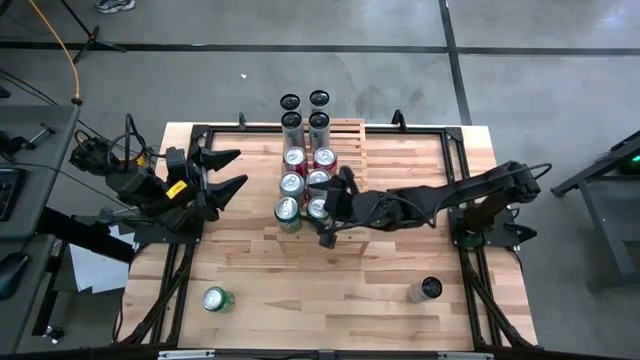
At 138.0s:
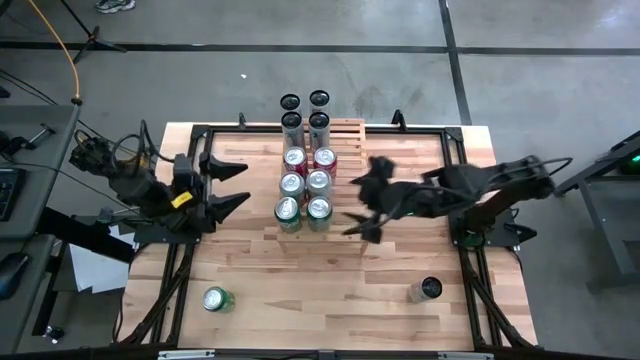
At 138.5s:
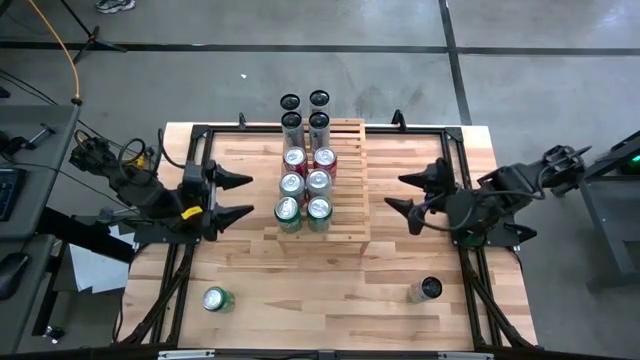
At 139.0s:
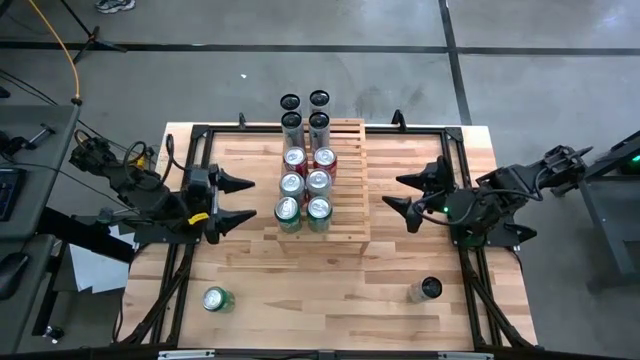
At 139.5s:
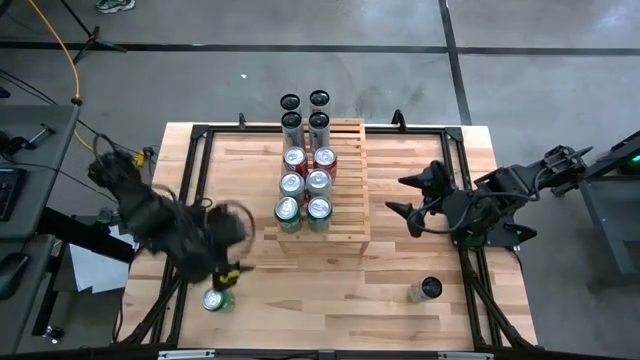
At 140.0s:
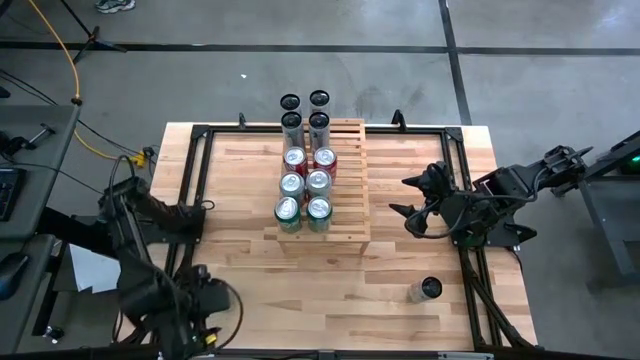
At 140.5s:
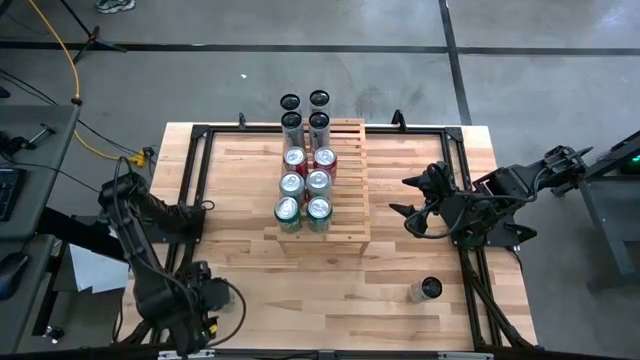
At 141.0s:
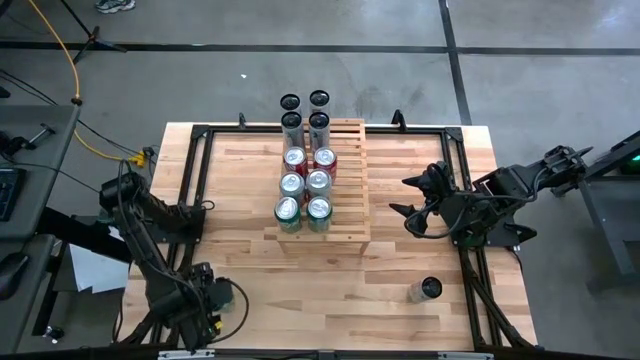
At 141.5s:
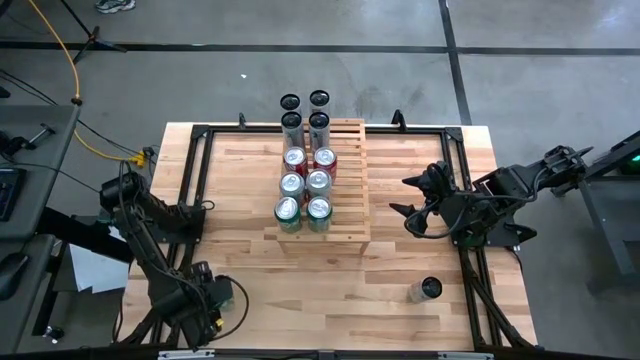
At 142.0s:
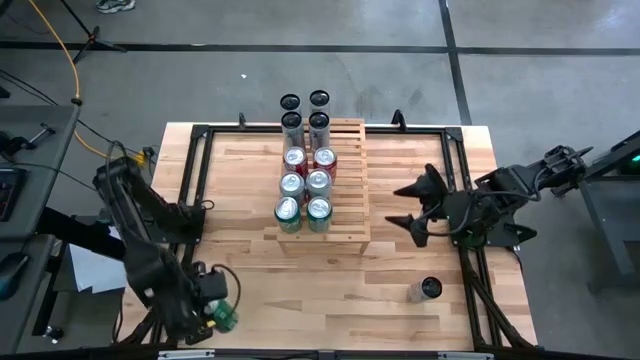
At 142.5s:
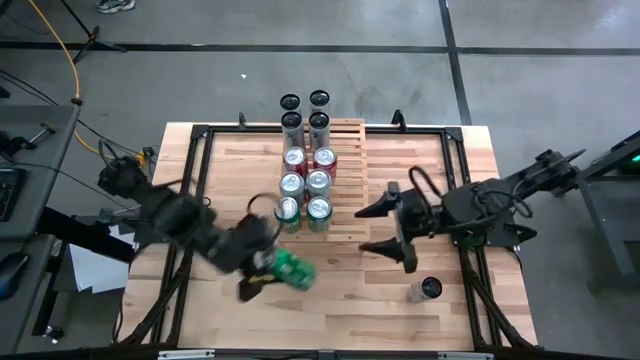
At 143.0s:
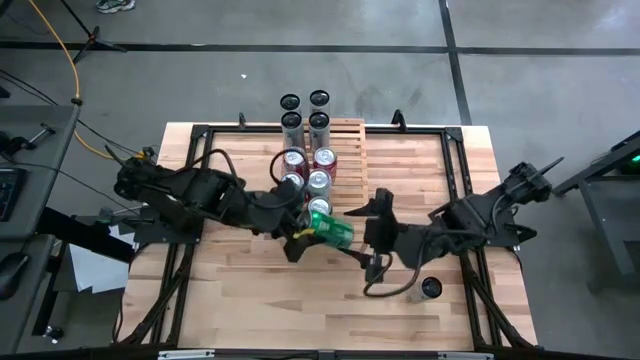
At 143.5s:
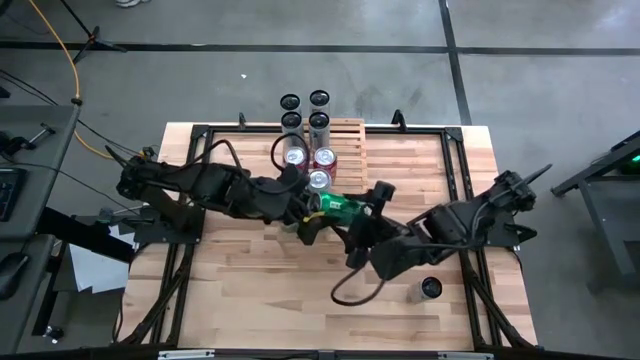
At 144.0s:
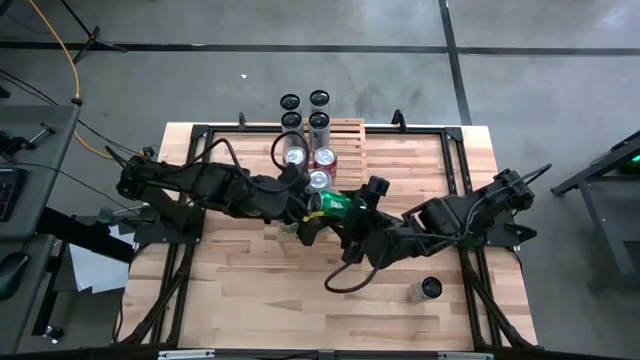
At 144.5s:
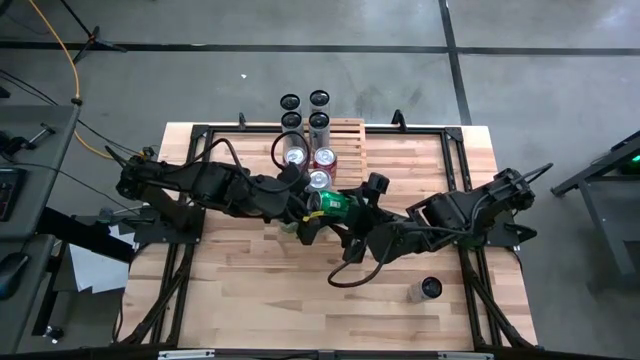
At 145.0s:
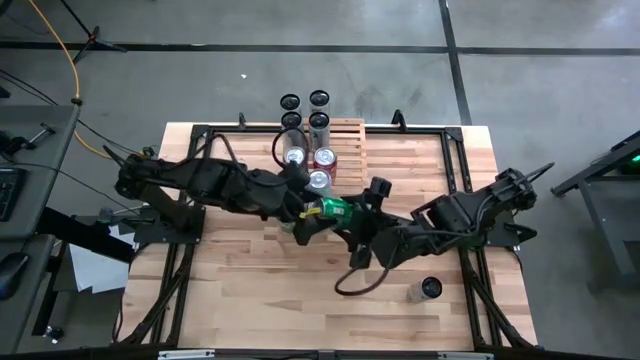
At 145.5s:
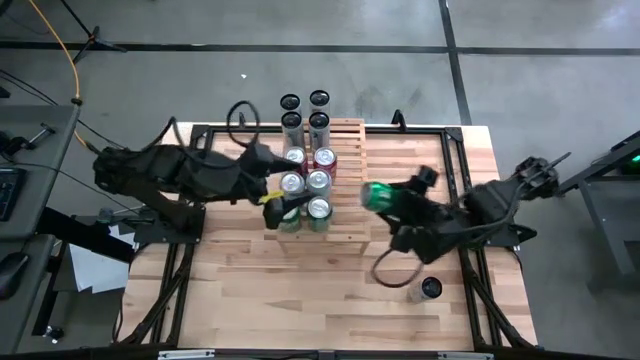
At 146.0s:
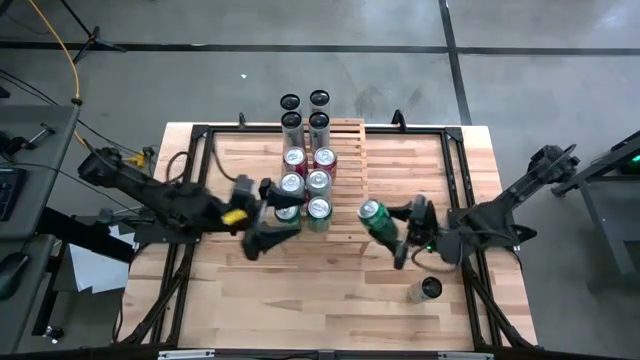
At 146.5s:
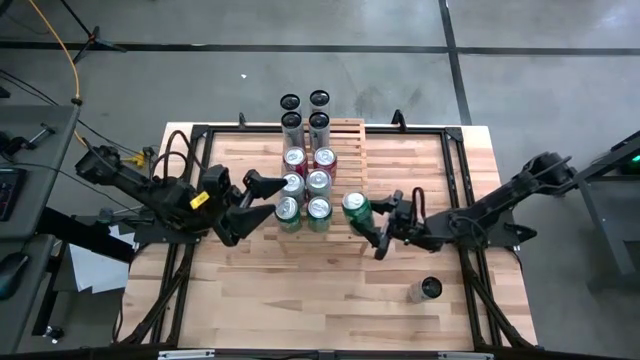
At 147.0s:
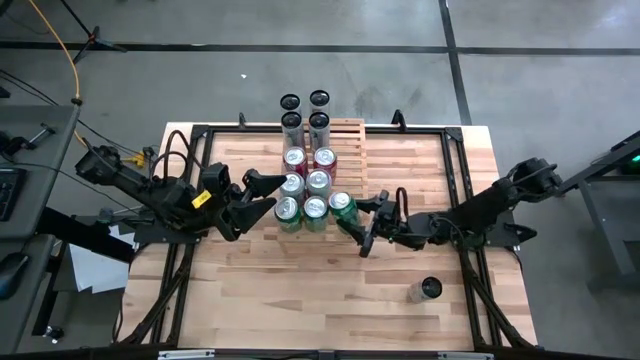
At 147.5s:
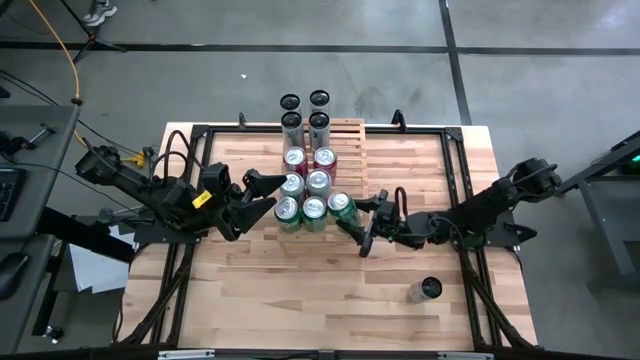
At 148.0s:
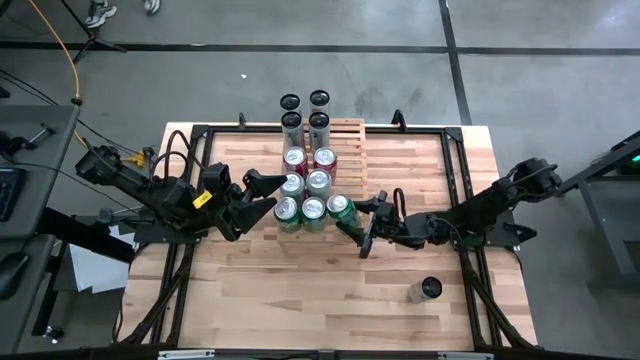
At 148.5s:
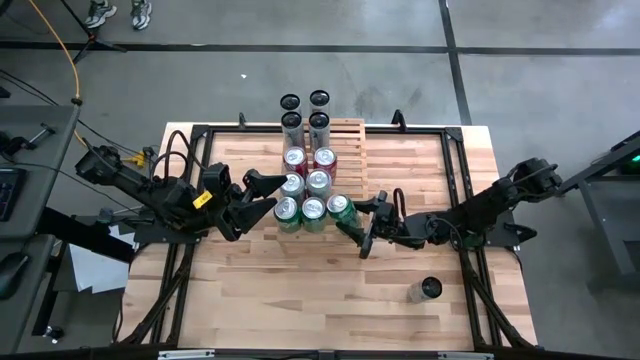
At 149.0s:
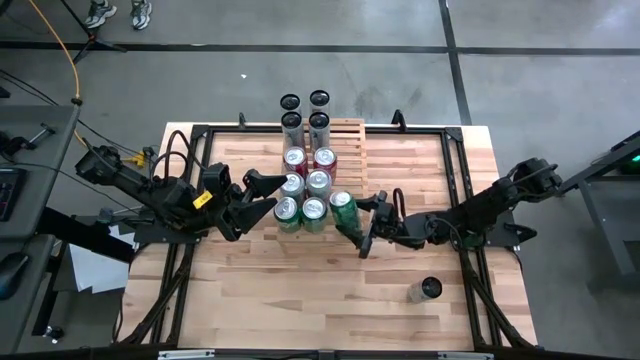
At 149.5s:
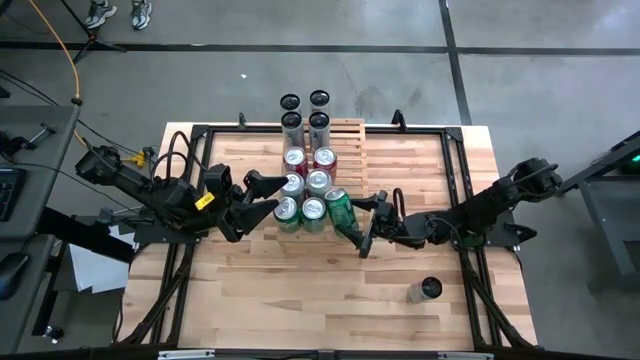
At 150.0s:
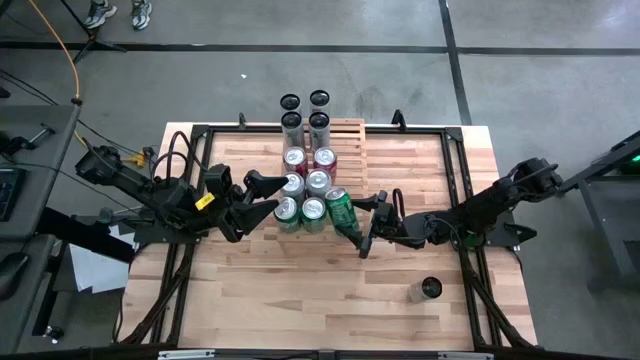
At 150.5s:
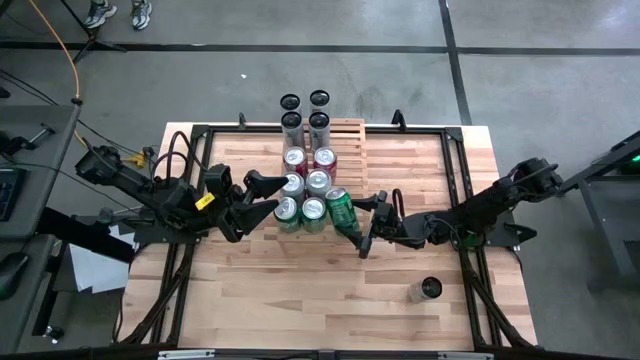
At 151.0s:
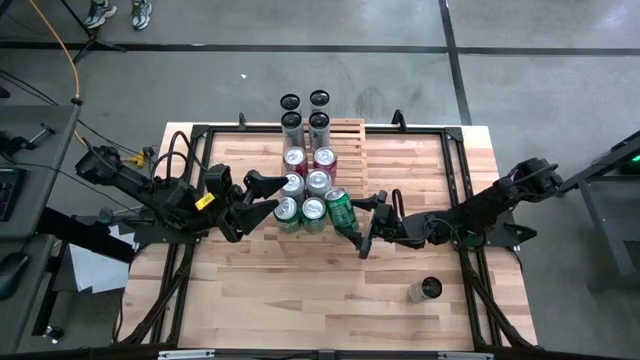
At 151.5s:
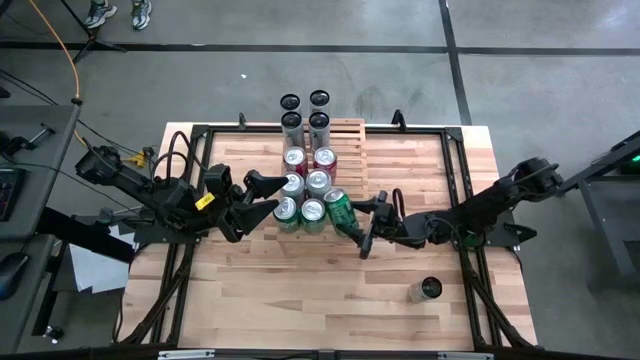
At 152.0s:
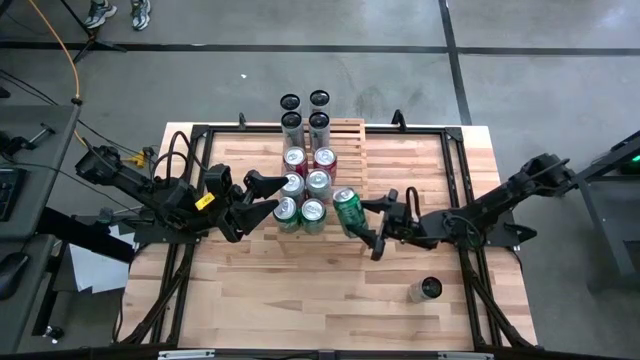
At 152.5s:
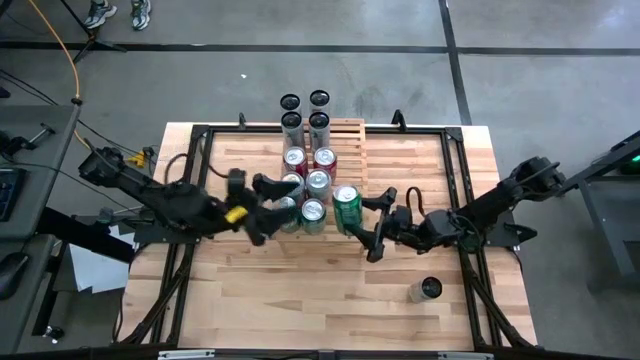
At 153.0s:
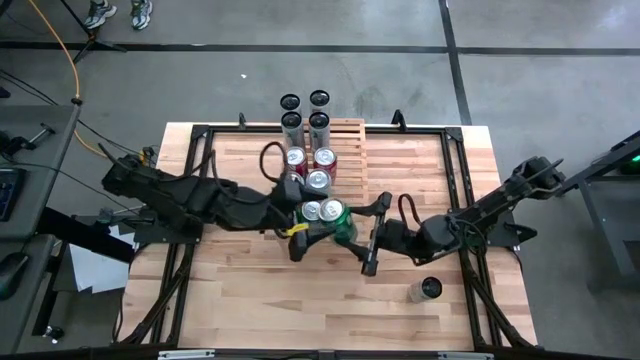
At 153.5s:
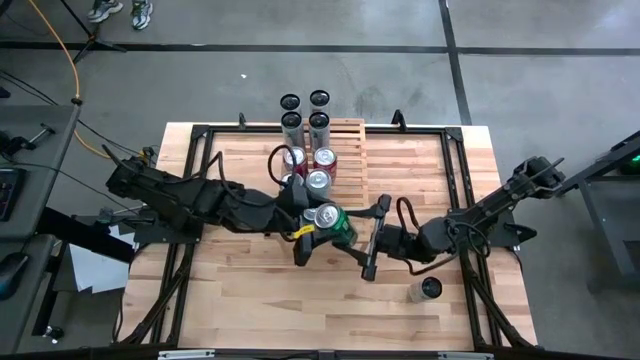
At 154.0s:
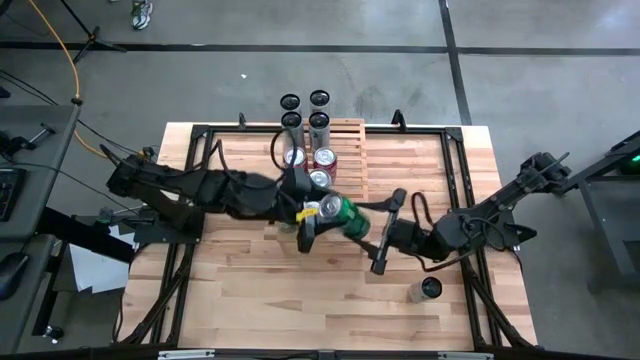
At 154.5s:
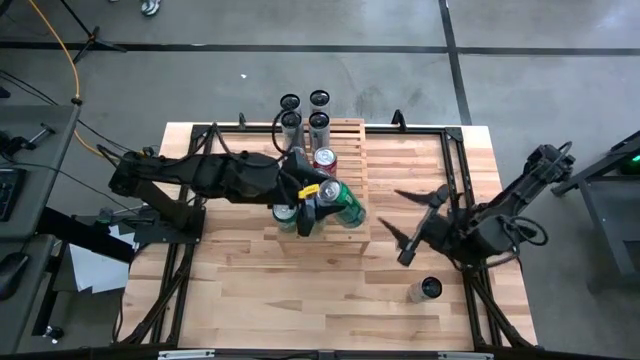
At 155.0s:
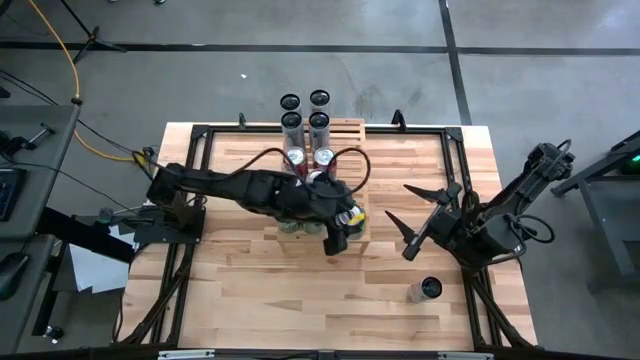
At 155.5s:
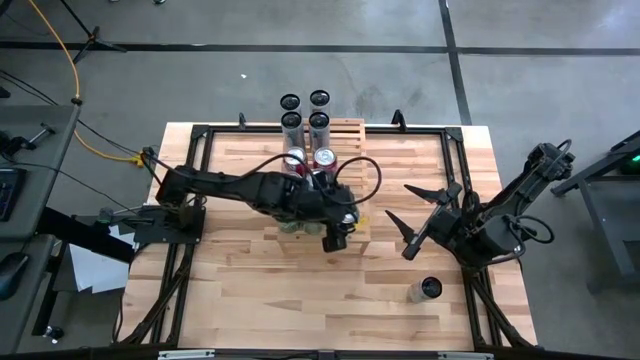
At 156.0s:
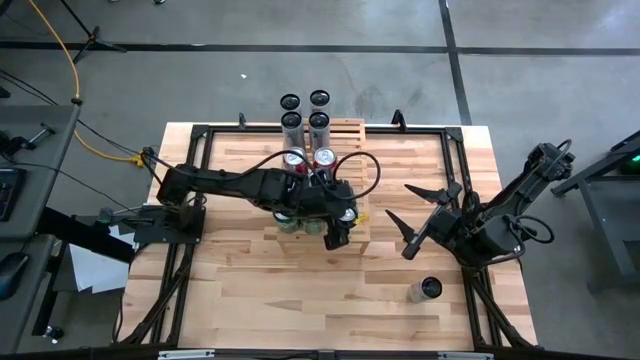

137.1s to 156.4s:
Task: Place canned beverage on shelf
Put the green soda can on the shelf aligned with the other green soda cans

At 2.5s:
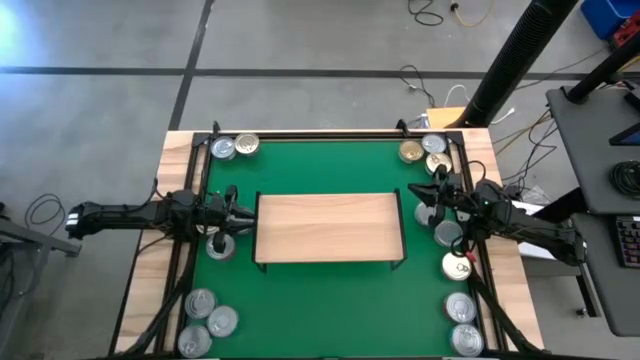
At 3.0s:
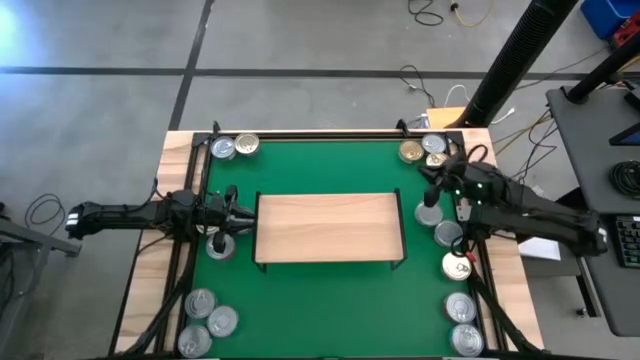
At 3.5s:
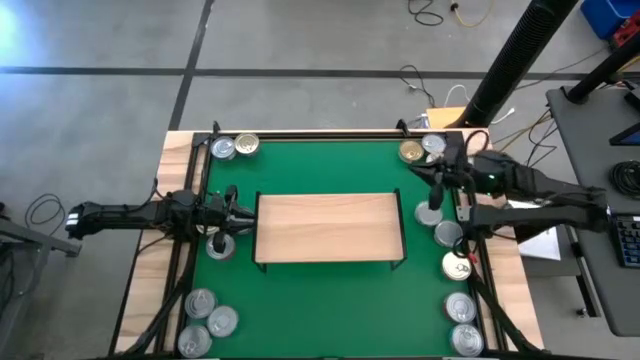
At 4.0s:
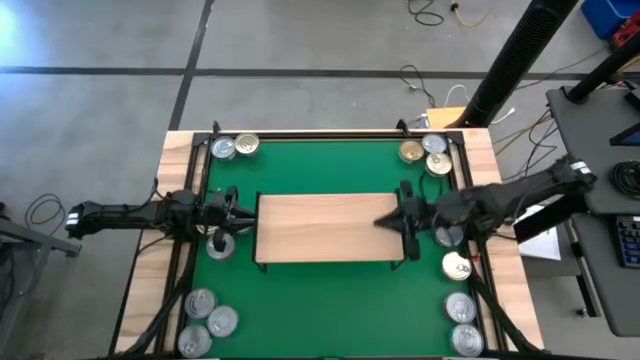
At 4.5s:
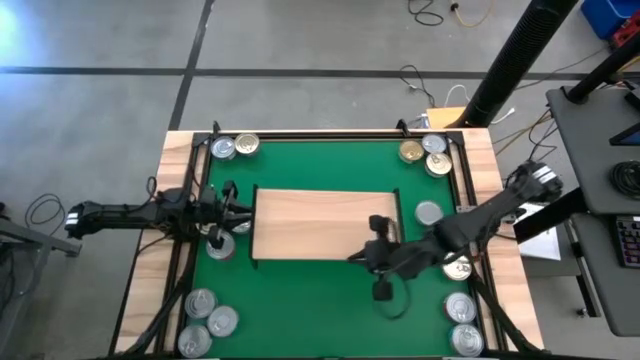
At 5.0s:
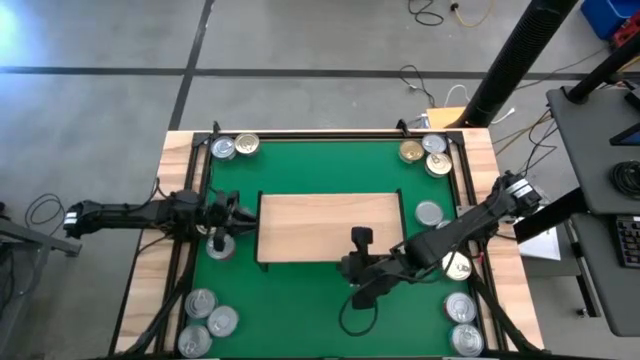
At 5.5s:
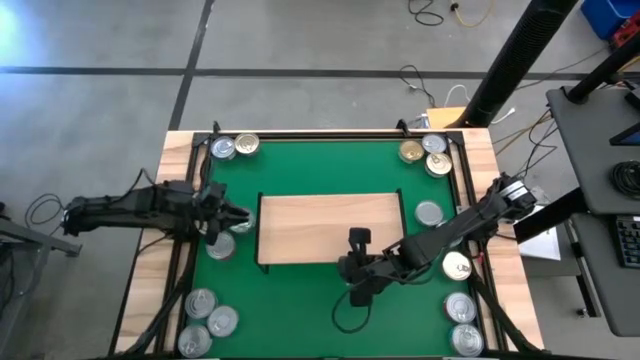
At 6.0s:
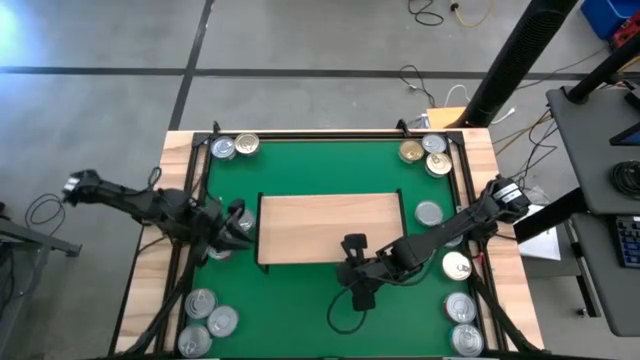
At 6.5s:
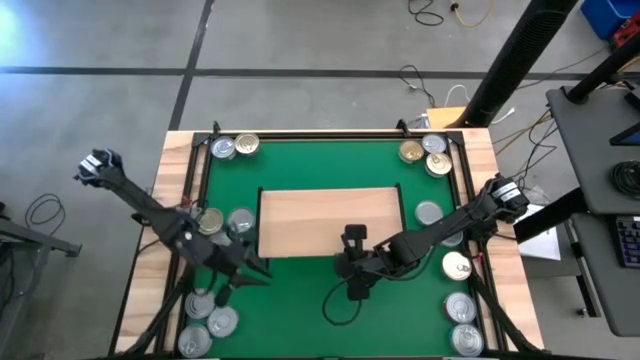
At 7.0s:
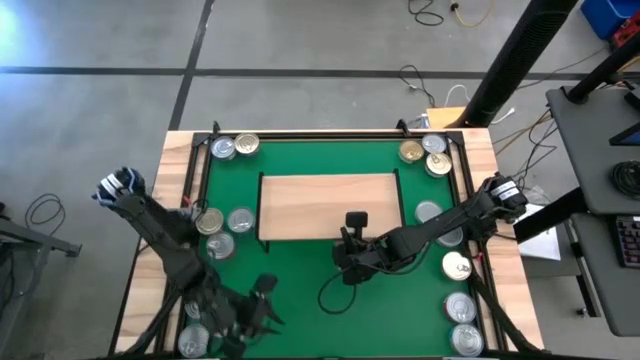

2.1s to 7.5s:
Task: Stack canned seafood by type on shelf
Adjust the shelf
